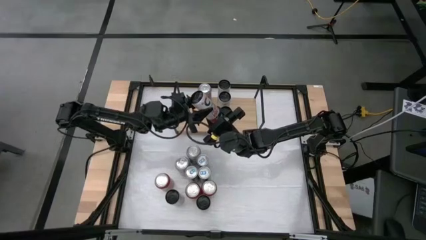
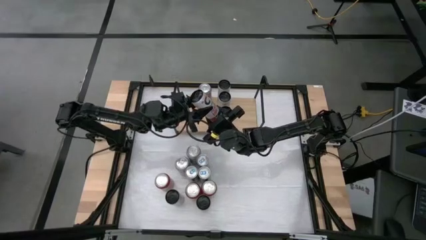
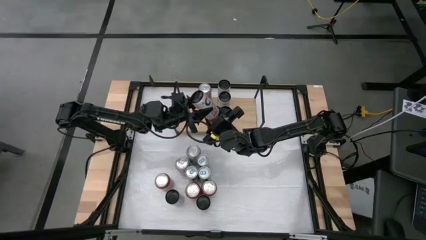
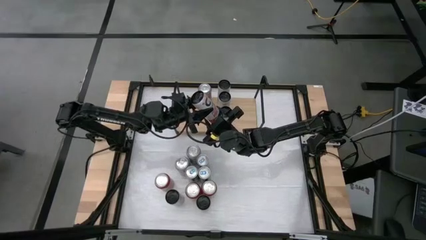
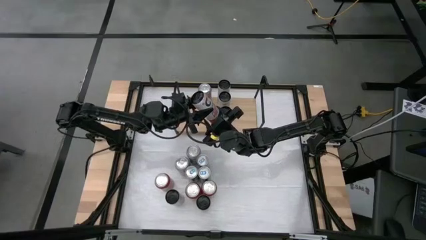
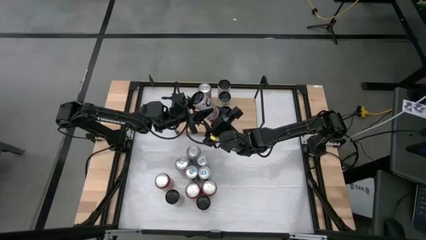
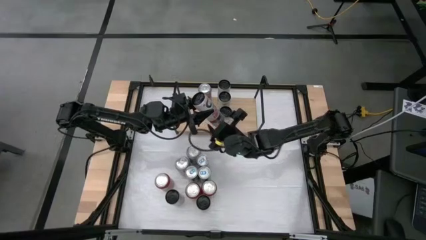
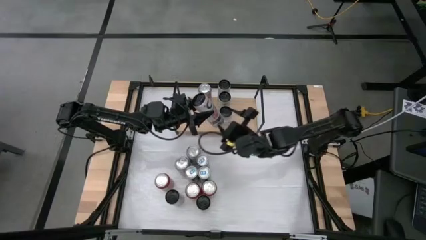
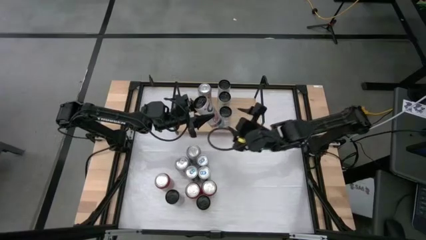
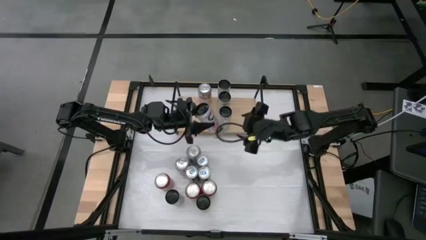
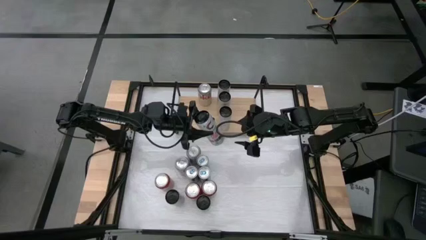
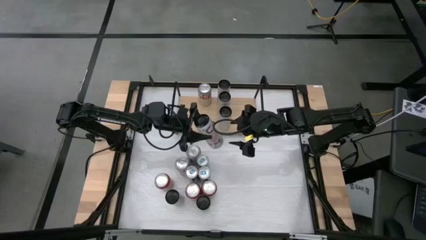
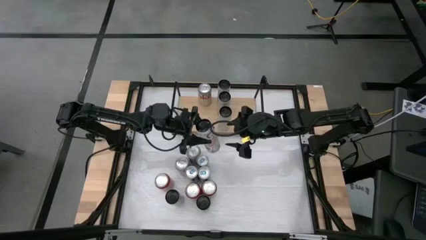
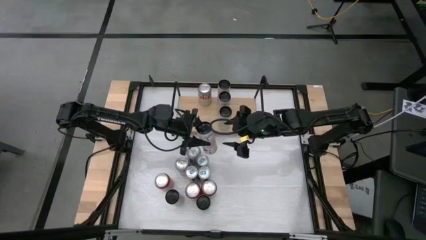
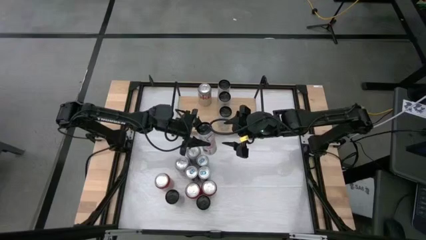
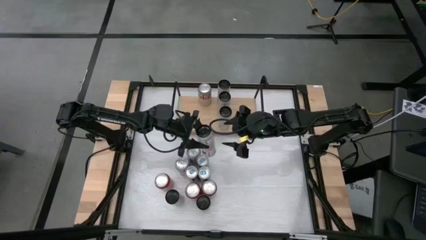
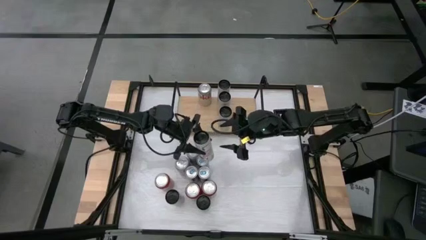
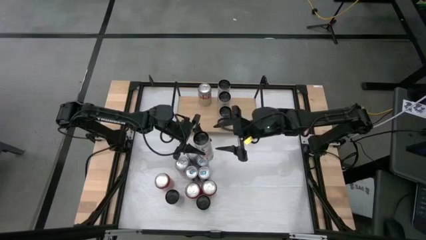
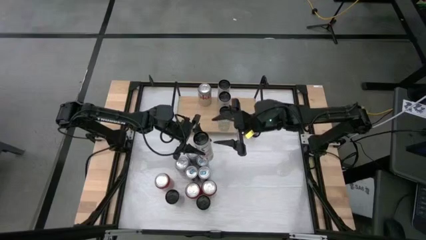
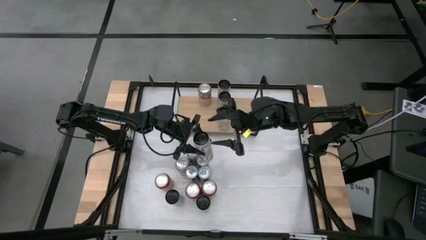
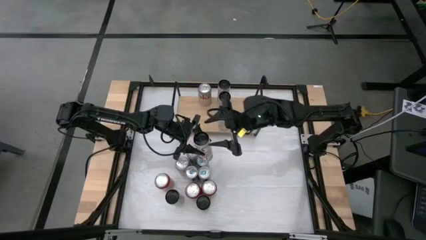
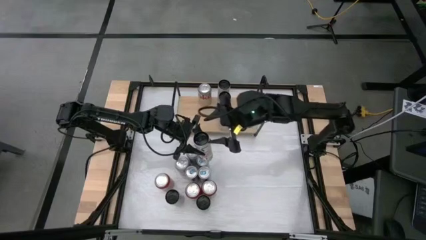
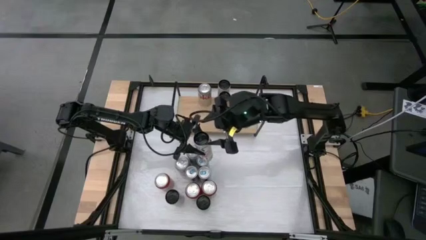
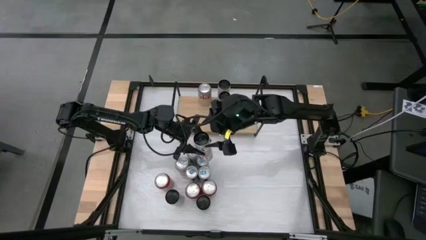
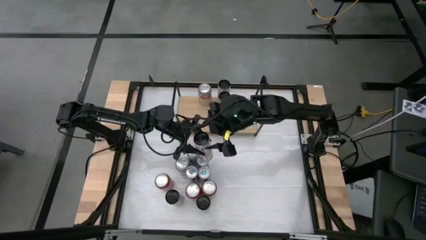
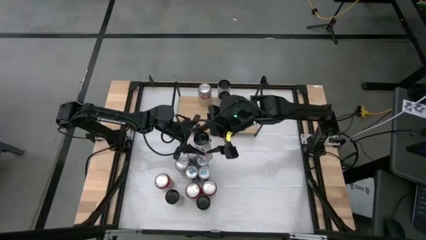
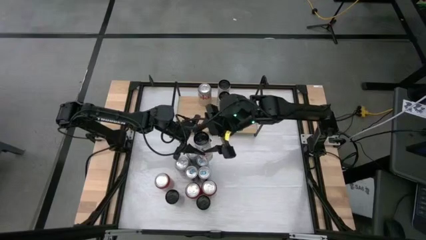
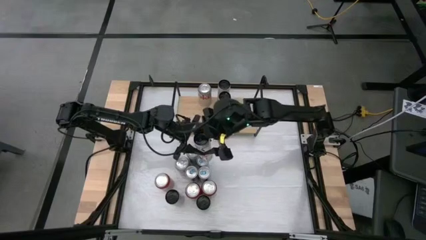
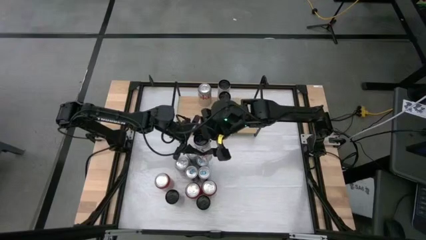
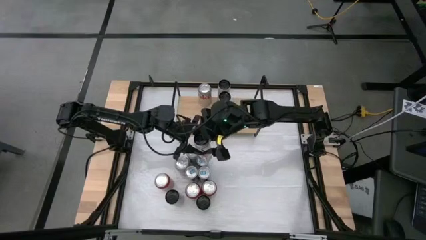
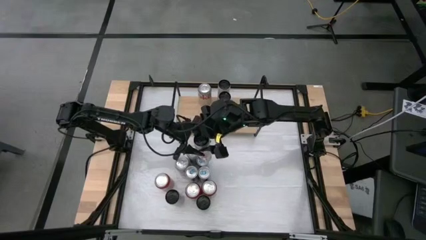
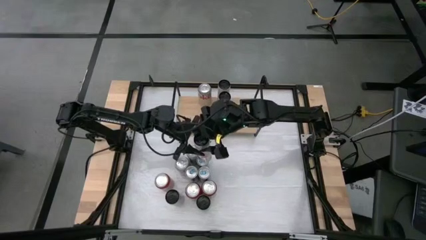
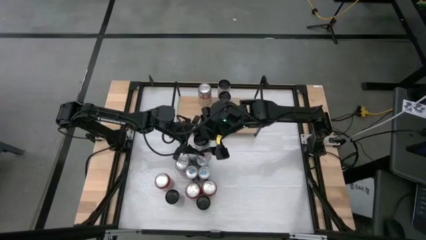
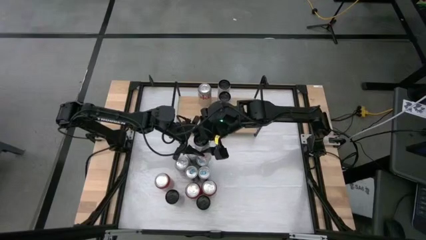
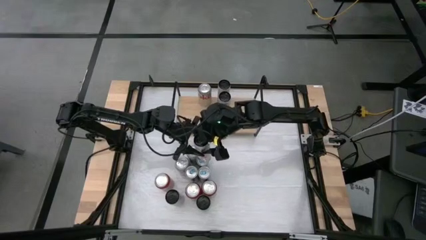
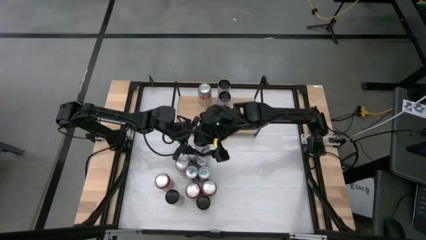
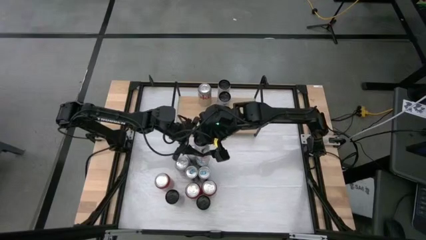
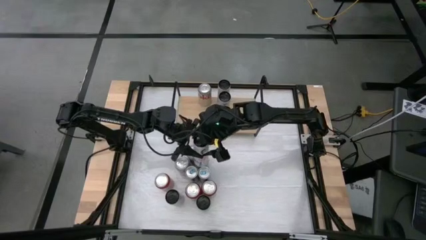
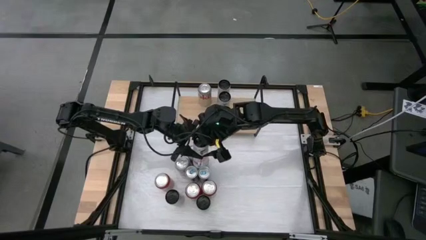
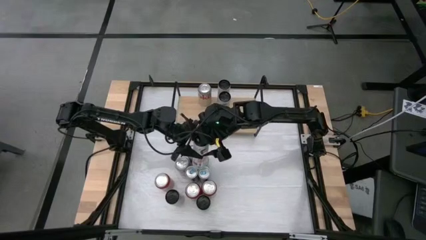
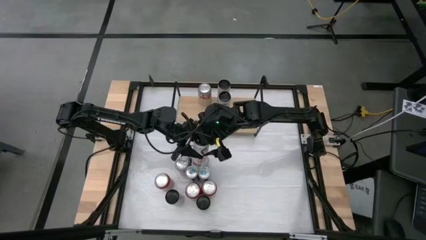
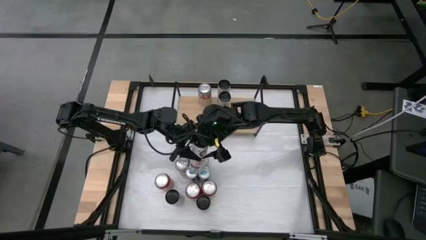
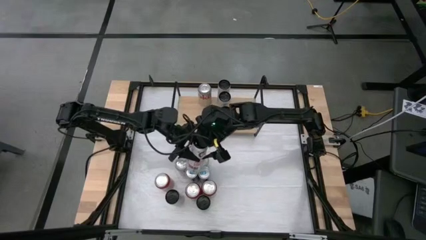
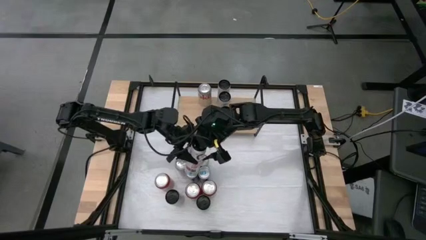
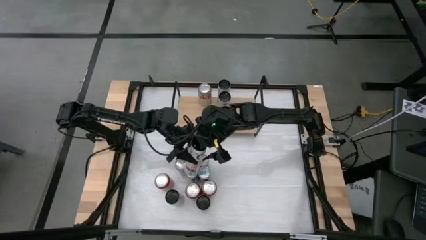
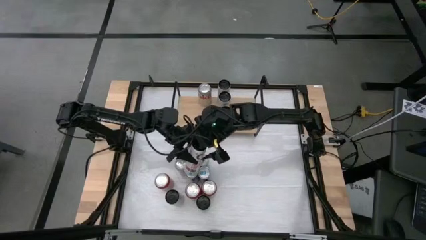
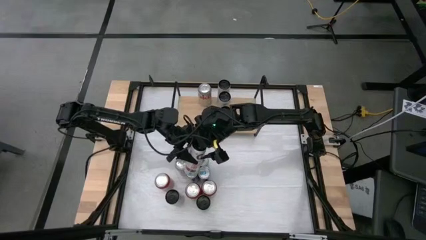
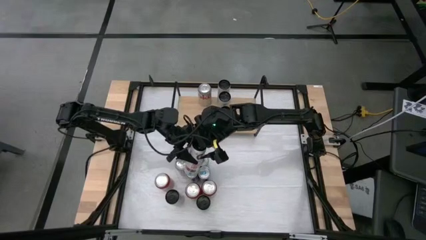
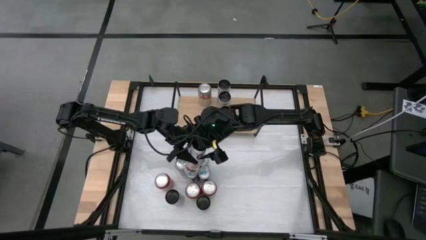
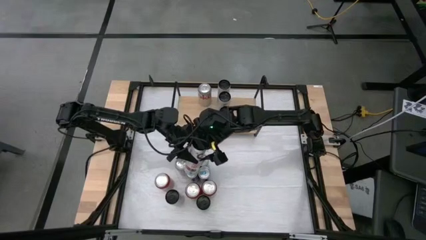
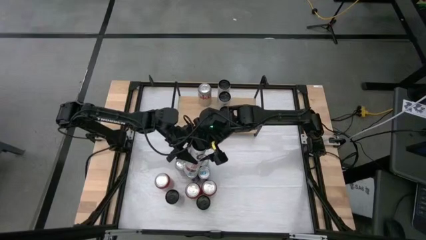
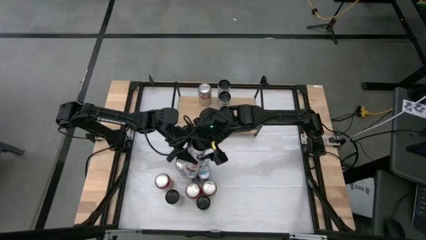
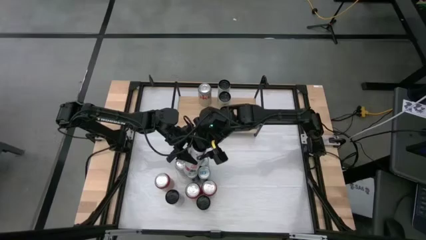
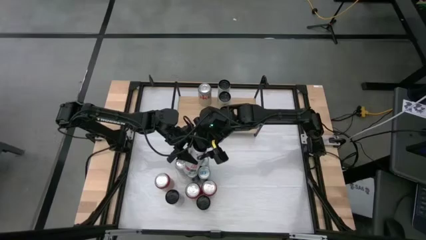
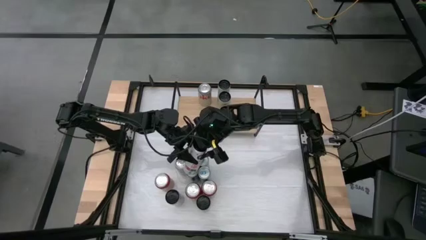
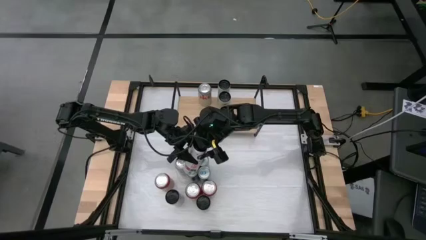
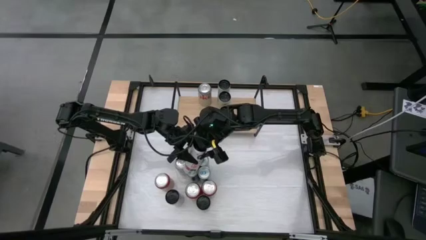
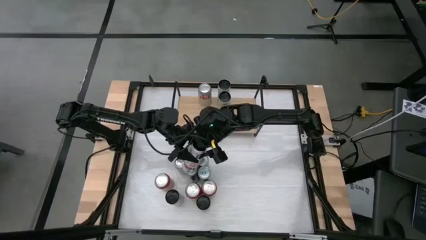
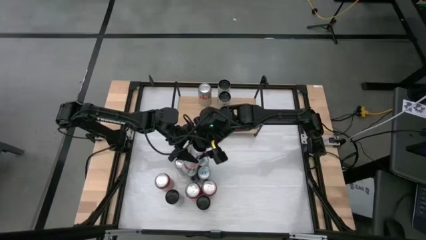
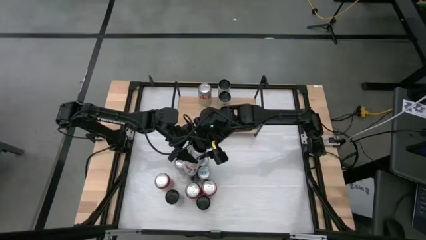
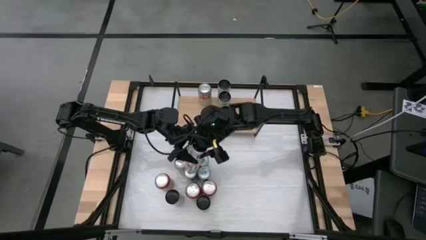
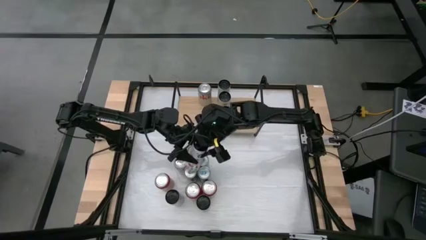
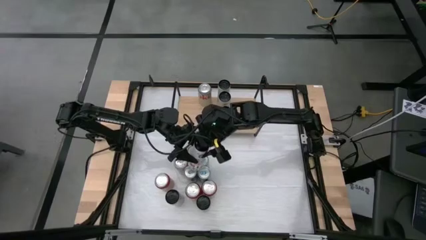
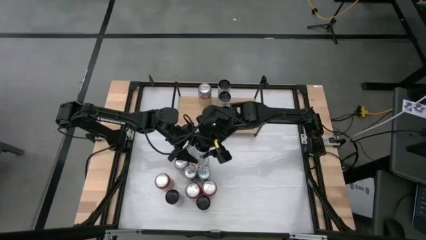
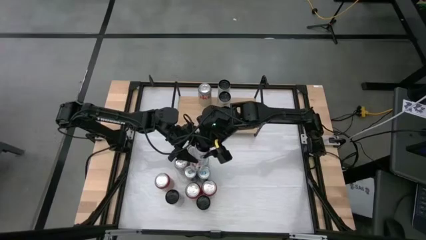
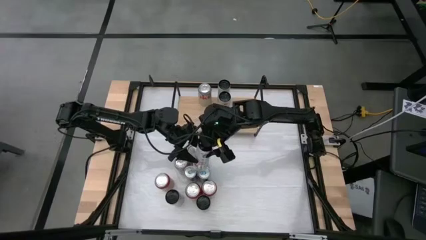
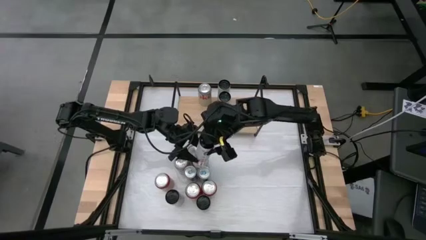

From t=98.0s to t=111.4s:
Task: Place canned beverage on shelf
Put the white pink soda can onto the shelf

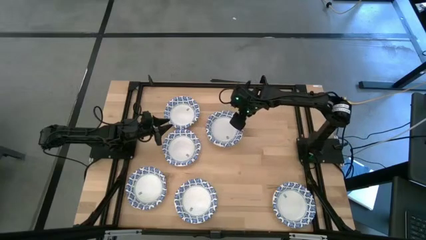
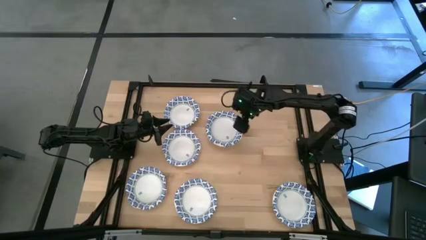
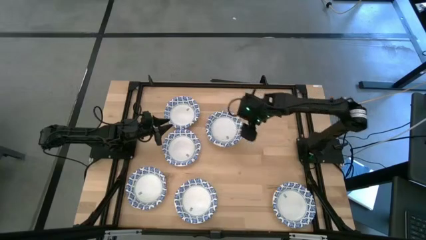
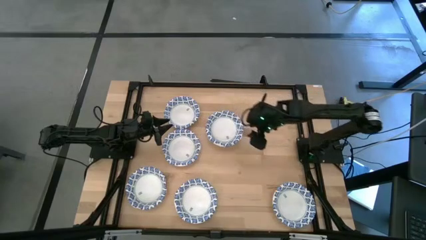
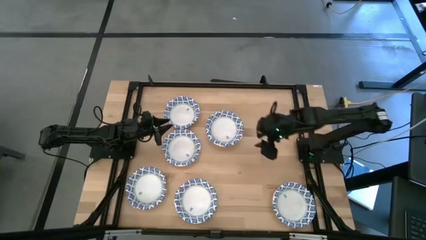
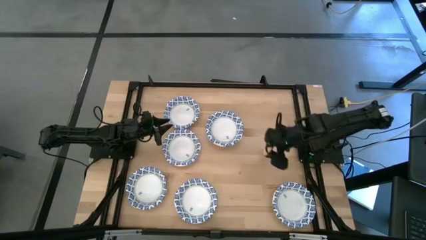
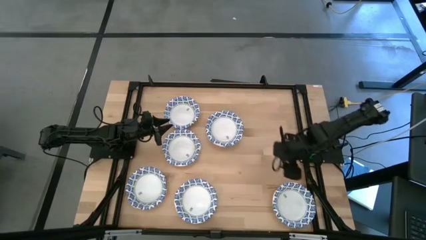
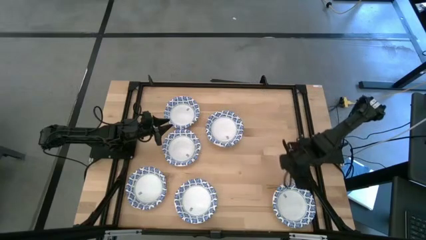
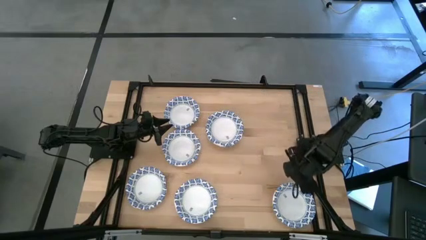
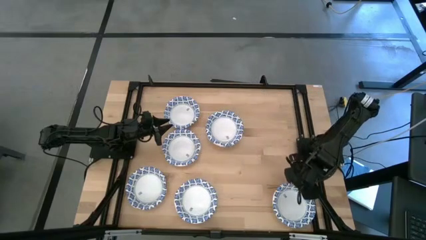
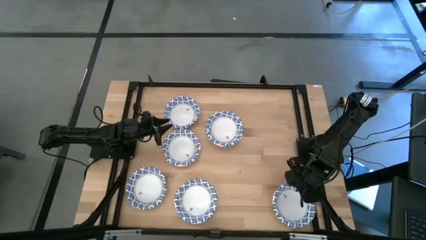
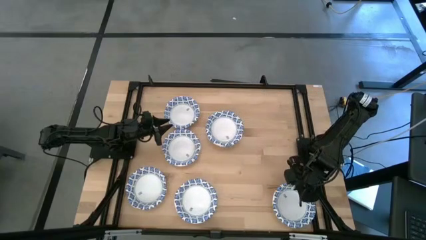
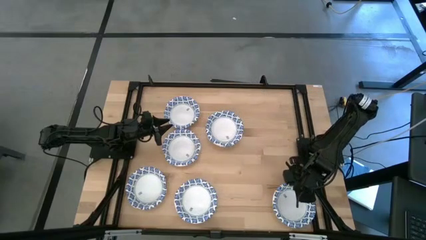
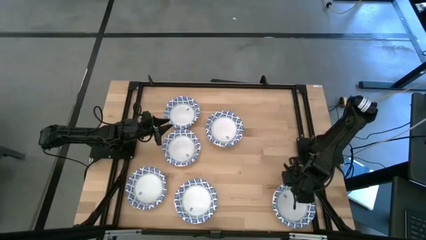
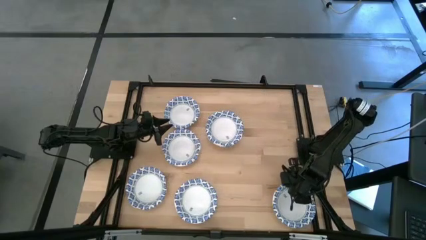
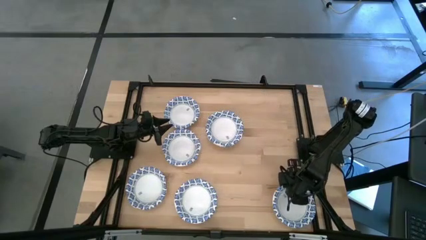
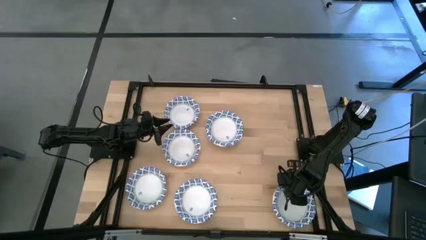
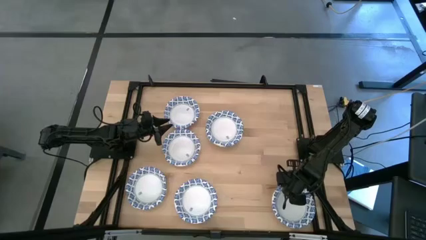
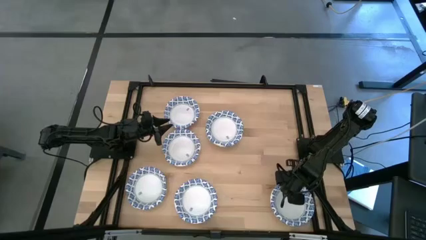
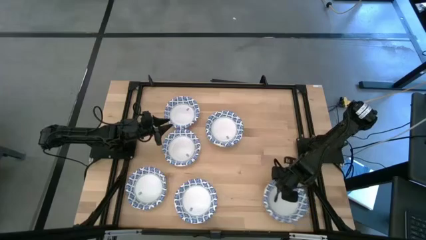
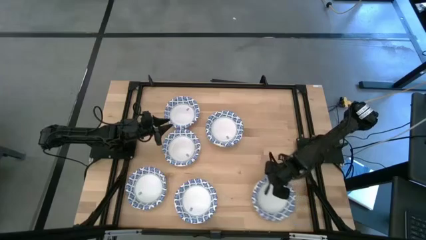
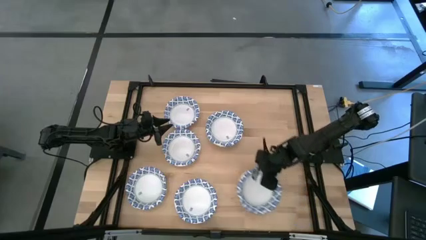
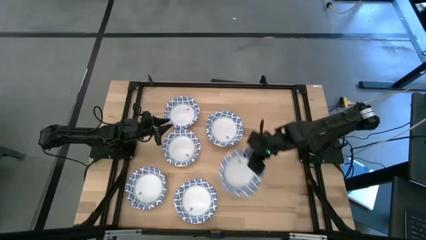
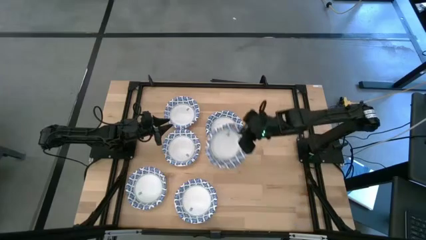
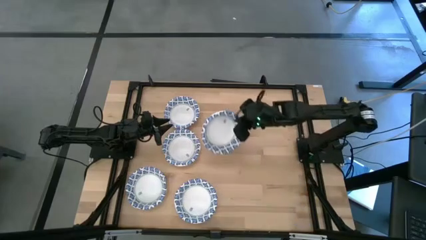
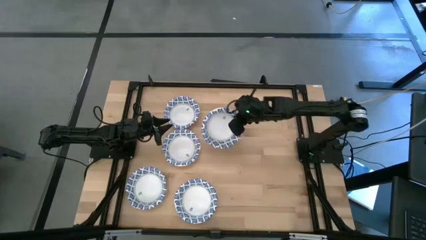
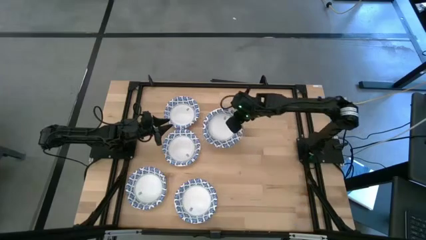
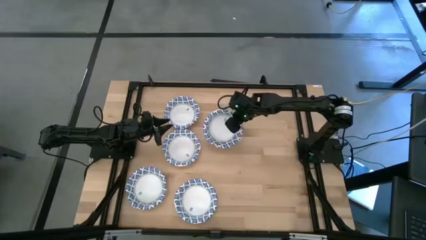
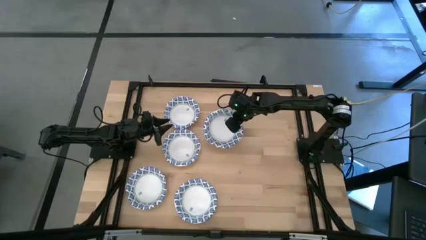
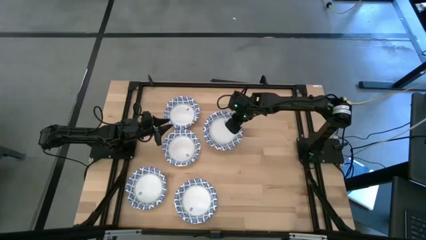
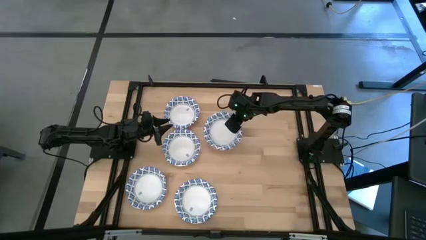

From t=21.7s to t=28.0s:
Task: Nest bowls inside each other
Stack the blue patterned bowl on top of the other blue patterned bowl
